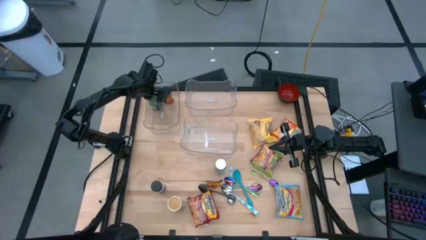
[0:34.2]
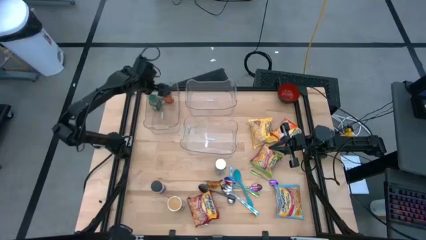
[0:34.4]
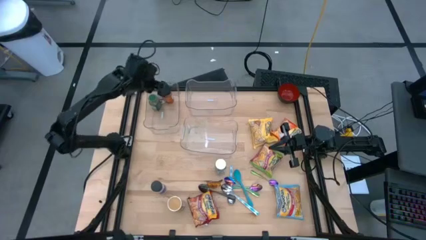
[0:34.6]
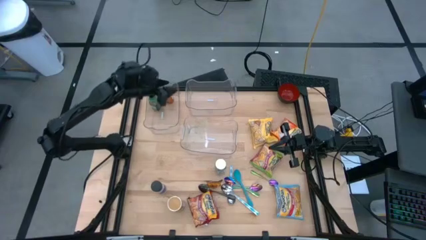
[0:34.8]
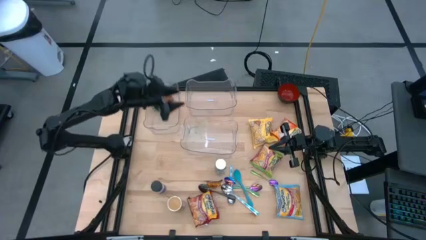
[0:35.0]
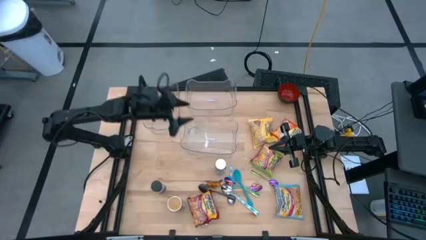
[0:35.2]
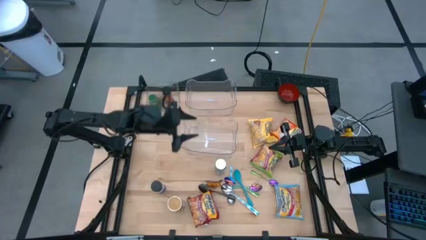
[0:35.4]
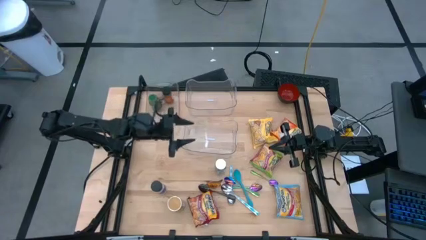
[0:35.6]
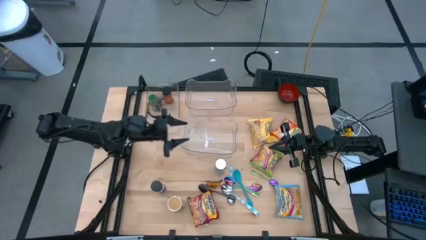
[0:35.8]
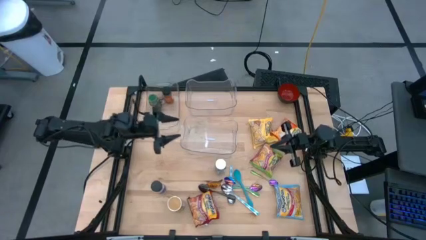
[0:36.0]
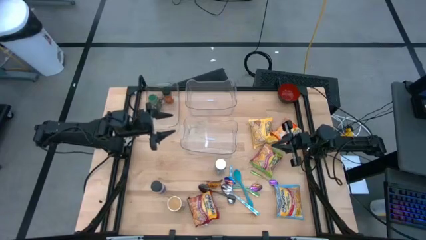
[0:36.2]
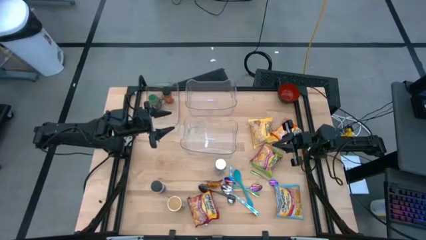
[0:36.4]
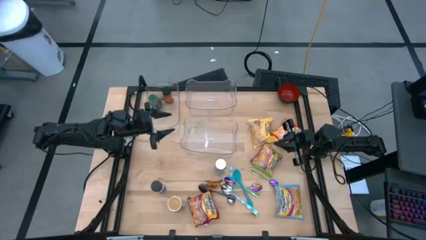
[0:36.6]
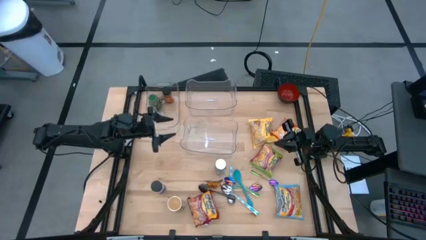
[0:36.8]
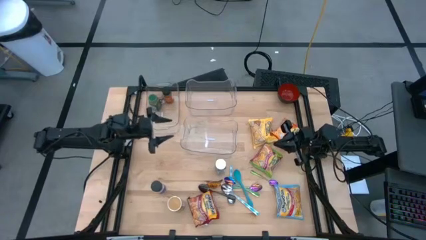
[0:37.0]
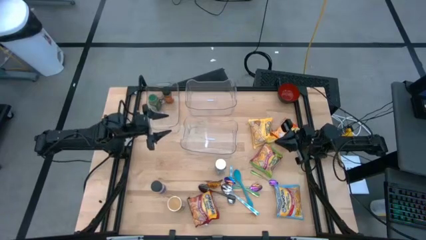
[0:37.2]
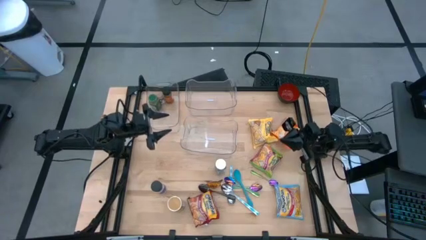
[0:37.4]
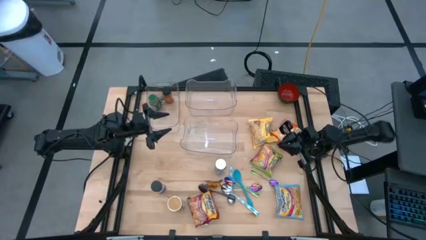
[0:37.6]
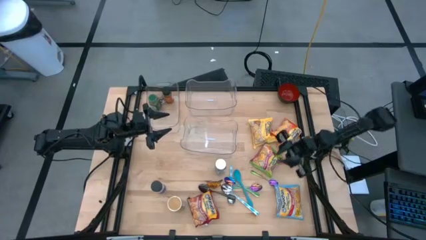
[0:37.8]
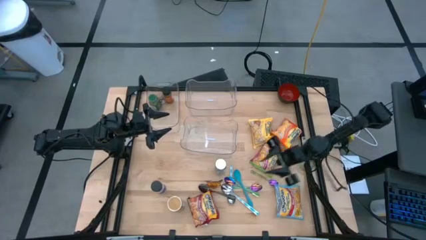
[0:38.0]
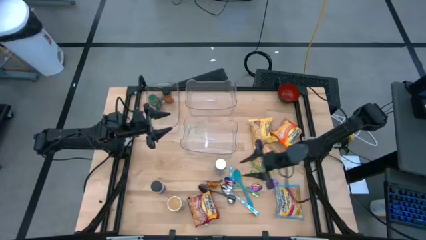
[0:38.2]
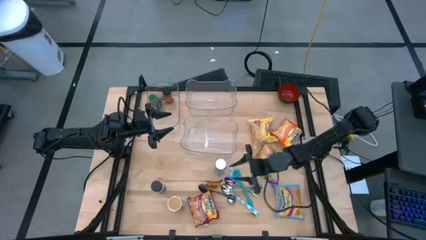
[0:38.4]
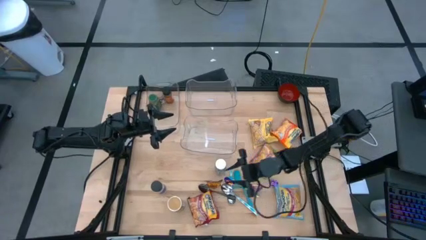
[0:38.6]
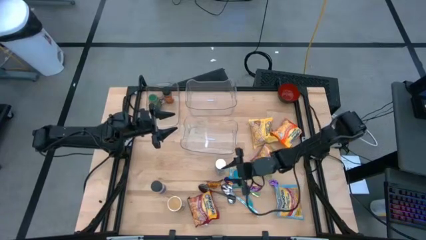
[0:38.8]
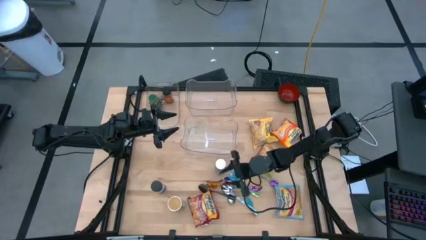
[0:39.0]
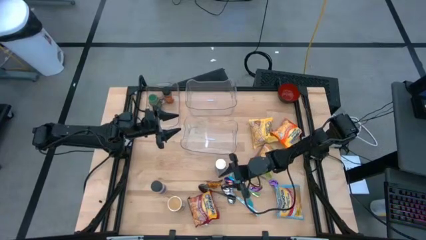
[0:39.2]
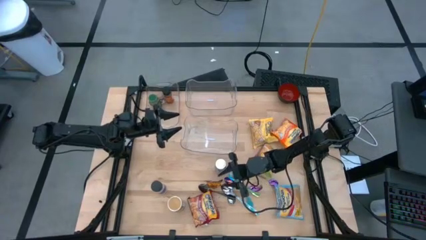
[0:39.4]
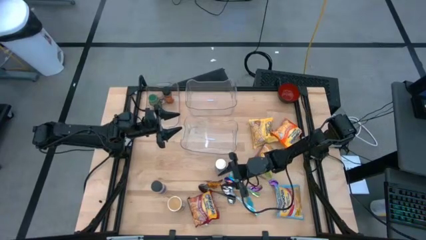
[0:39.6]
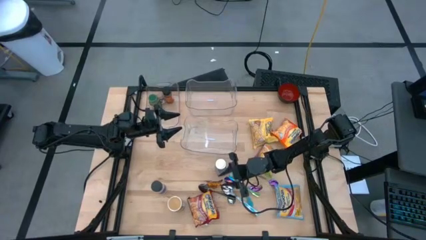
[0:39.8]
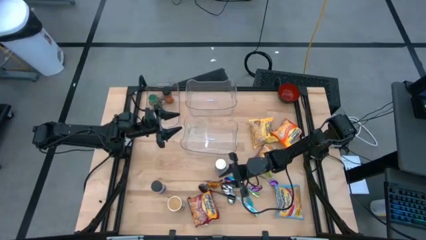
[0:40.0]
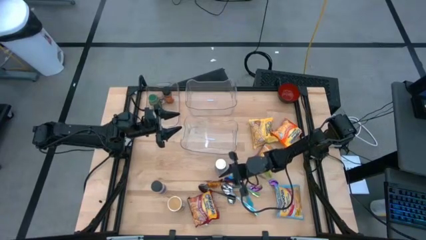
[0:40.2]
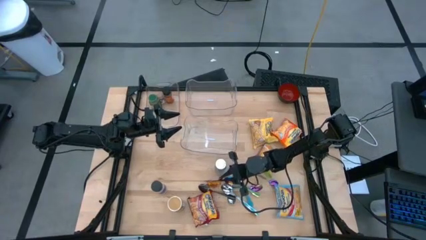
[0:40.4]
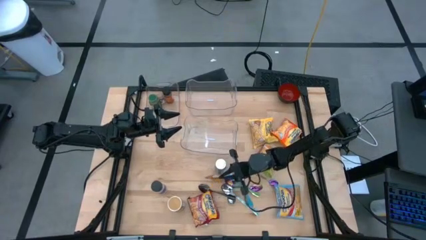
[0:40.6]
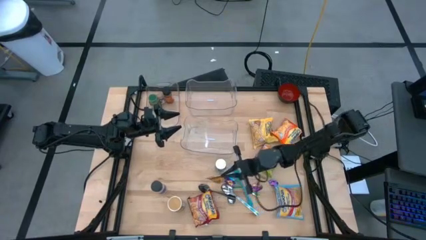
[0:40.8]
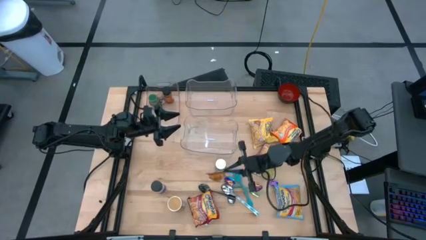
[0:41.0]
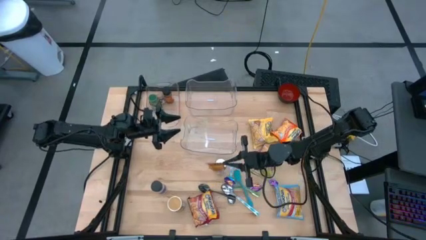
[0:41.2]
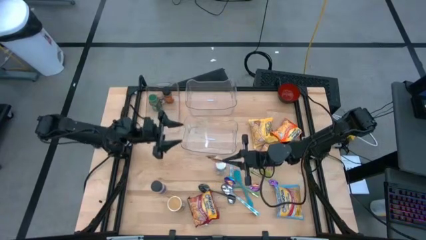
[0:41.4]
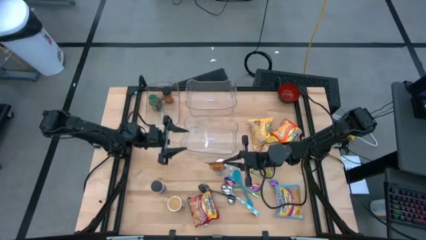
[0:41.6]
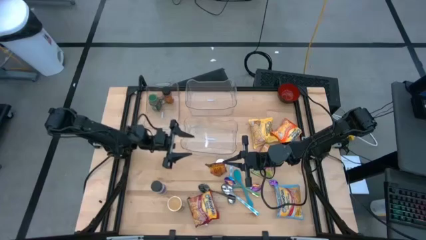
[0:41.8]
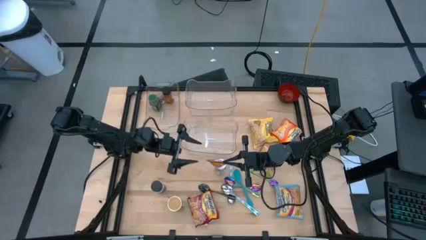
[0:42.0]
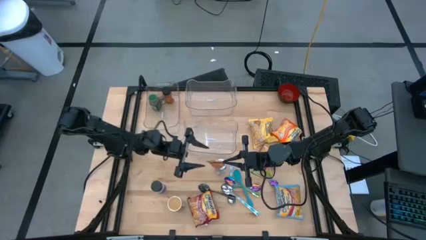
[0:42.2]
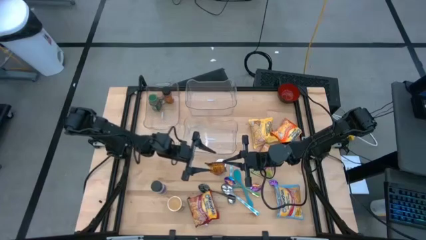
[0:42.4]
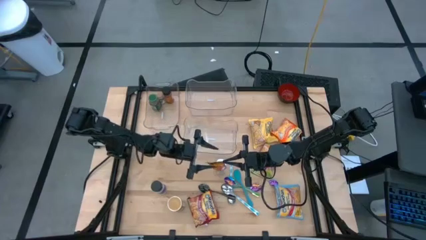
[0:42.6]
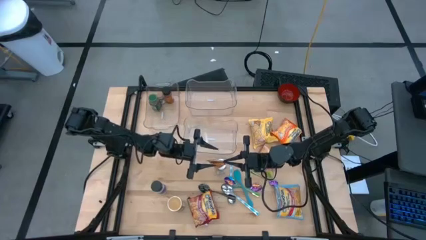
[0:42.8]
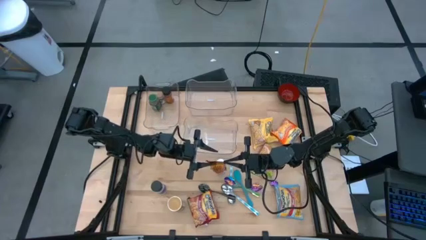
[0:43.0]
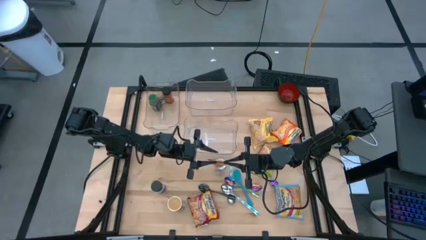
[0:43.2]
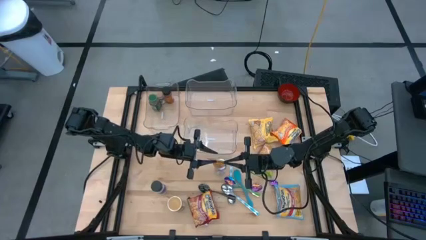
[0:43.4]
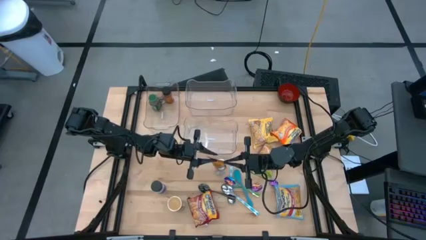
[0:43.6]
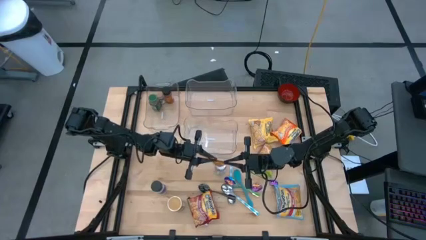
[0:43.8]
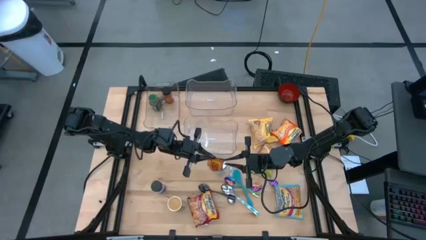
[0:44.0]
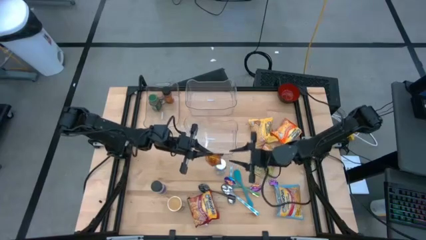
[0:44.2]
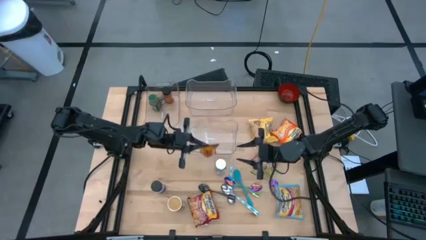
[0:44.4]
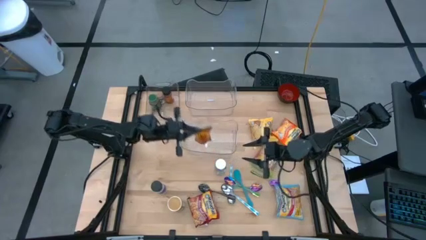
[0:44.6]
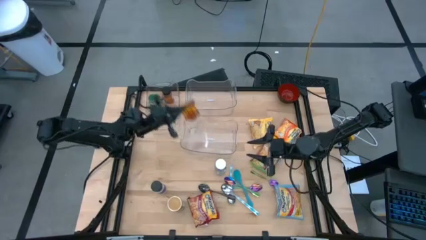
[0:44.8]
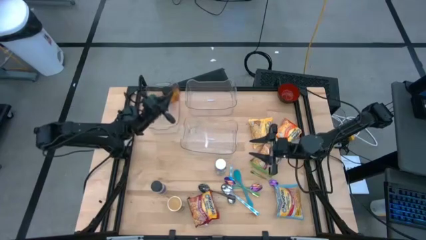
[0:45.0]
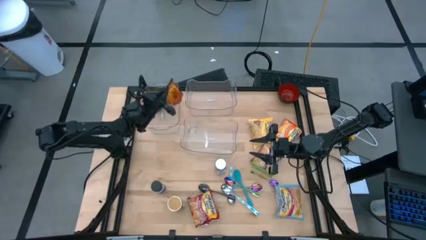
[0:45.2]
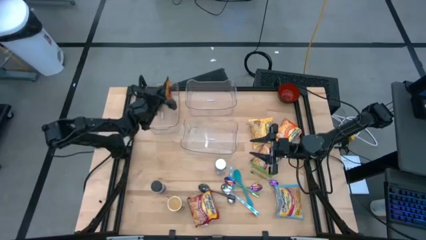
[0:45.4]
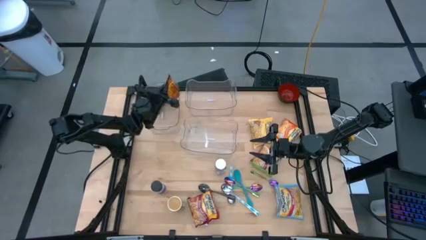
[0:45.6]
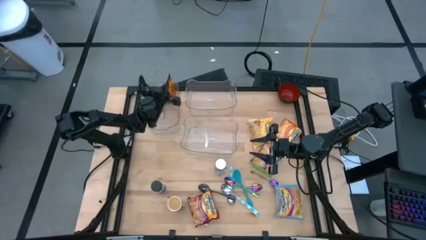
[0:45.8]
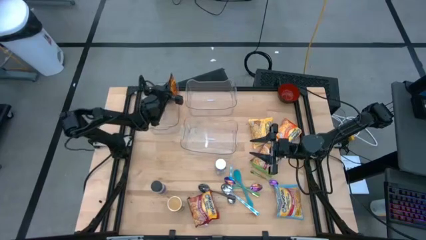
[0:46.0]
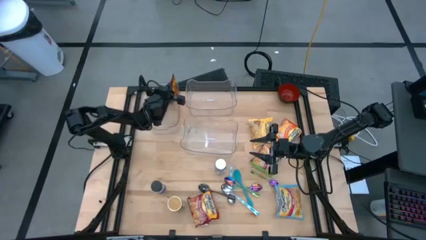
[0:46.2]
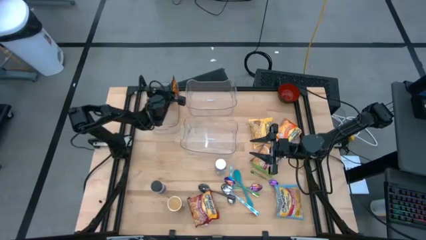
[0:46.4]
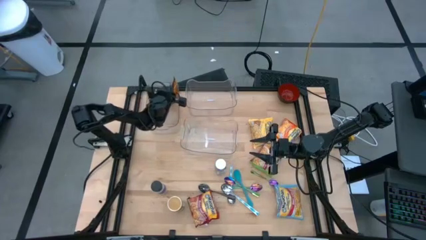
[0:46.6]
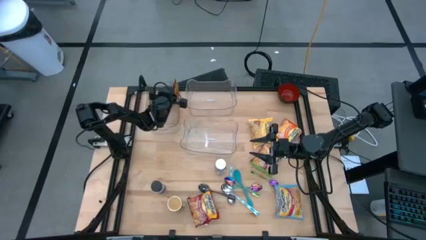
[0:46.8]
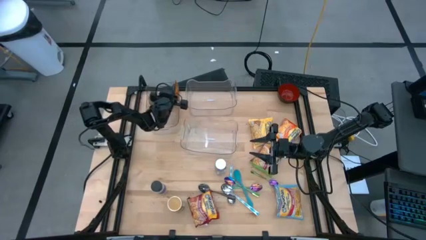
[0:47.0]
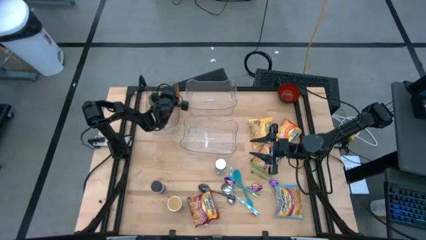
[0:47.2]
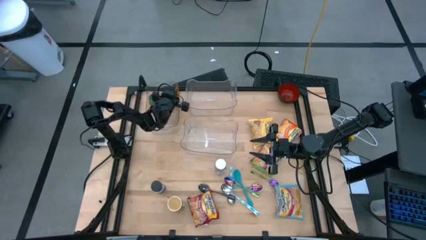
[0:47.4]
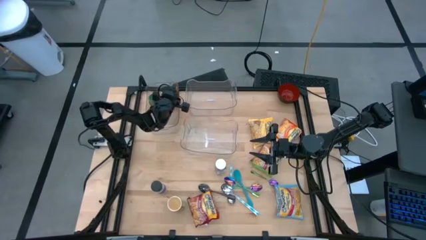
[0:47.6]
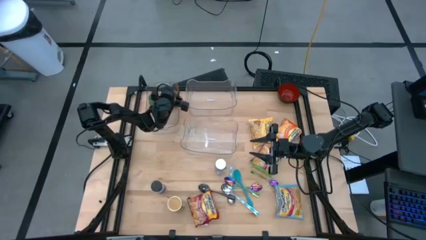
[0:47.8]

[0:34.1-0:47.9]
Task: Pick & Place Food Item
Put the orange seasoning pack into the top left transparent bin
